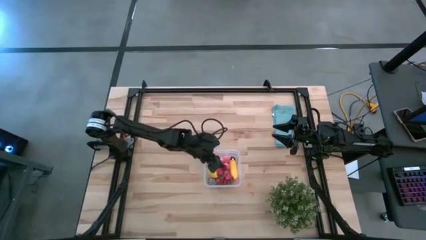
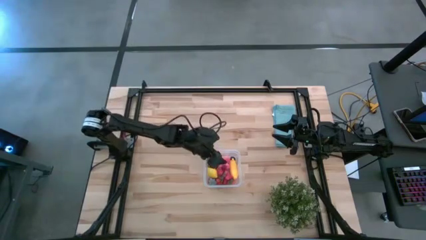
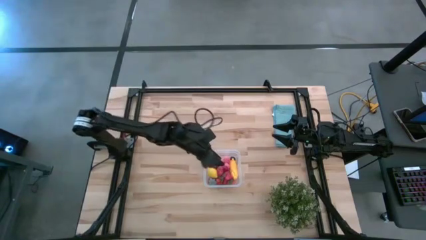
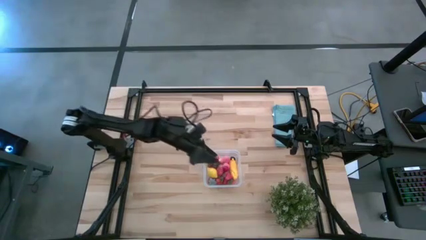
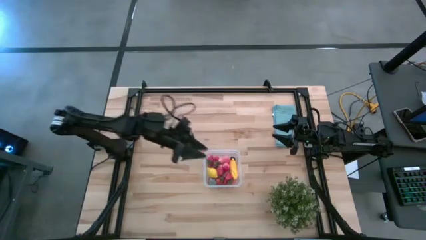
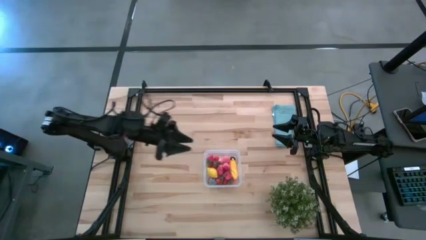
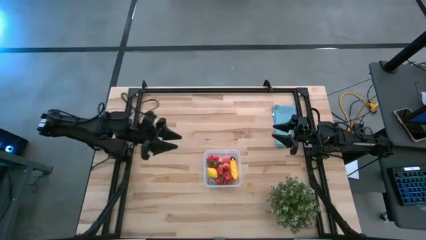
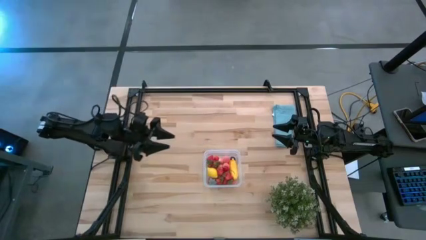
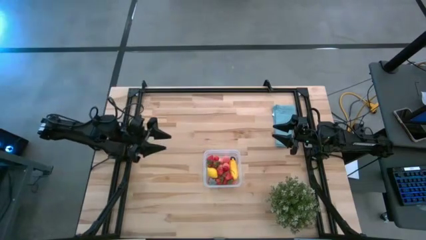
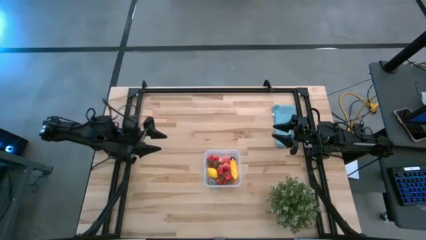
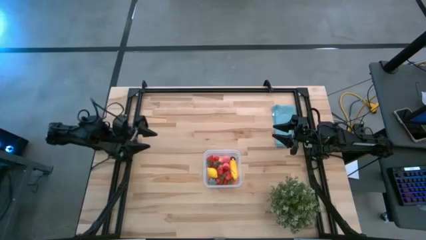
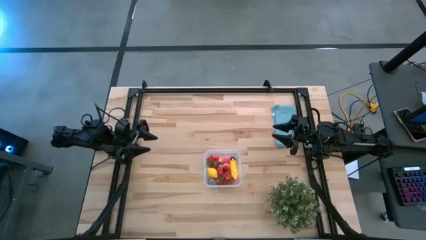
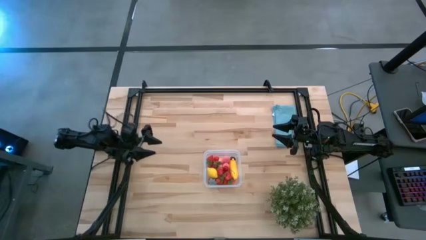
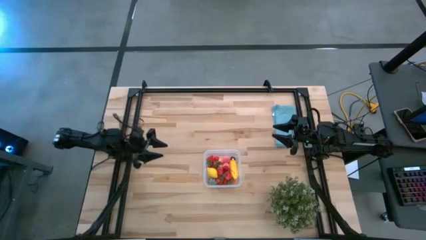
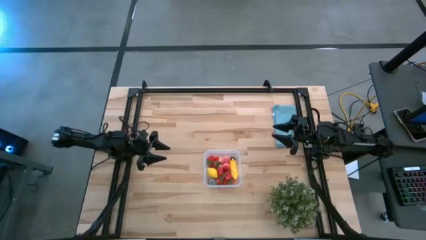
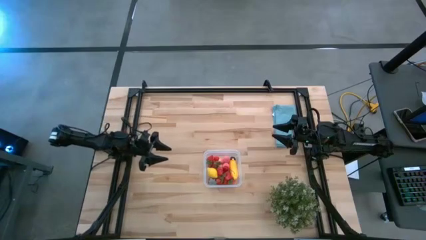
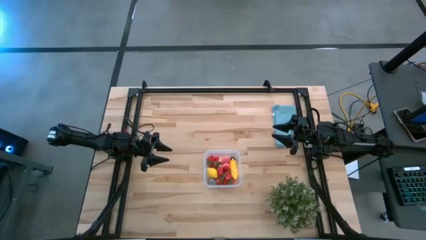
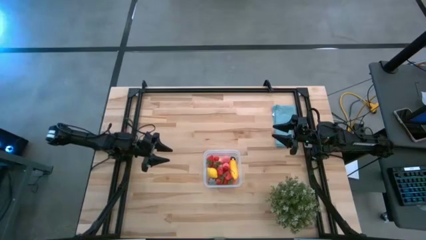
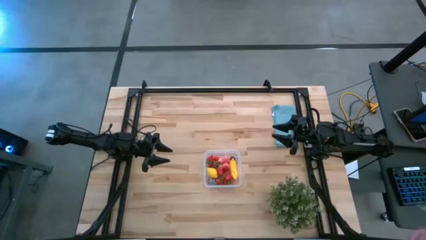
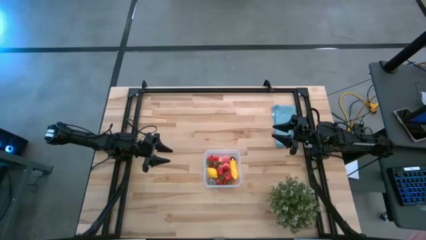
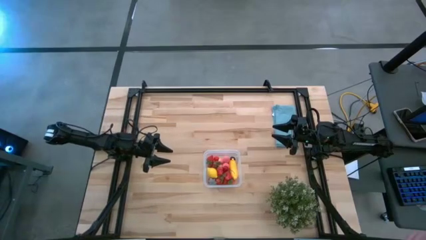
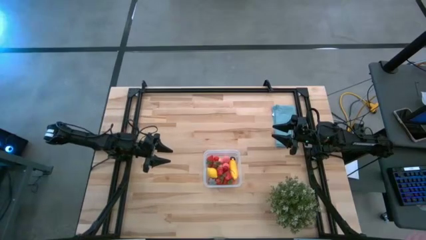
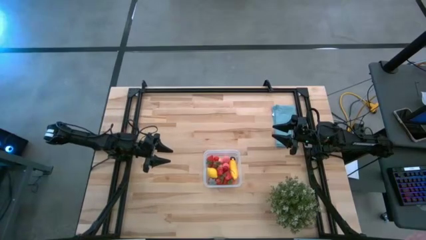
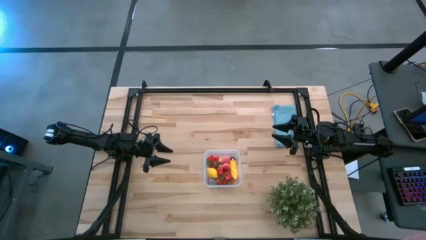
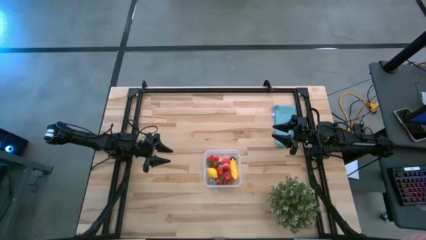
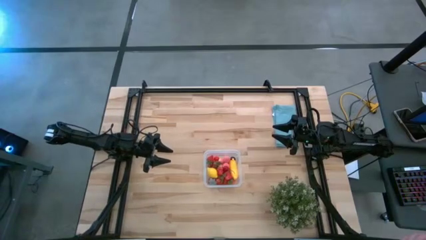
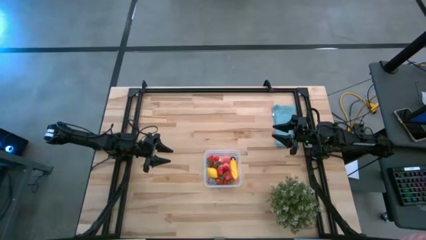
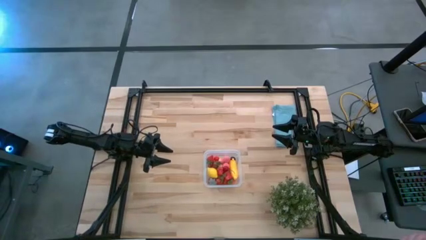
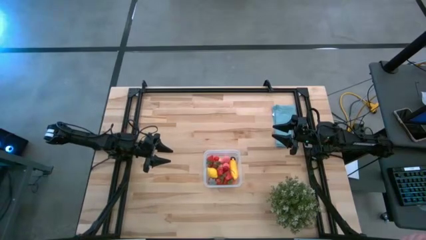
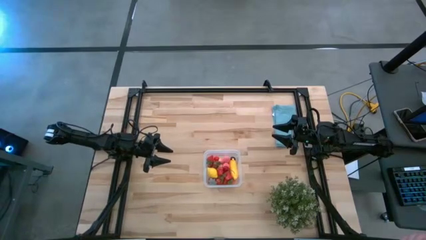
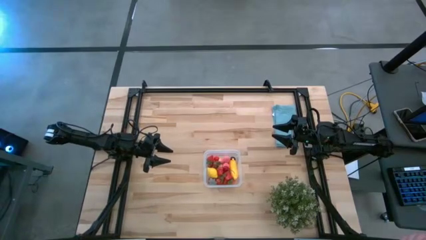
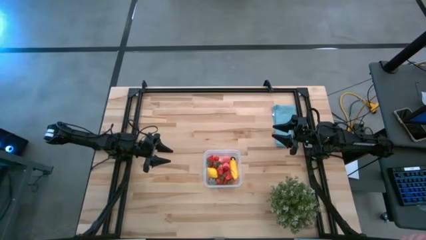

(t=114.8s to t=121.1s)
Task: Pick and placing Produce into tupperware
Return to Home Position

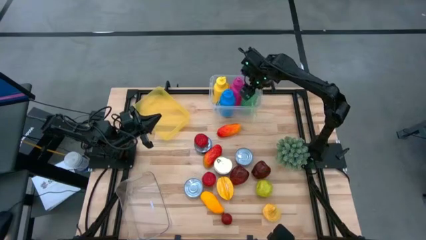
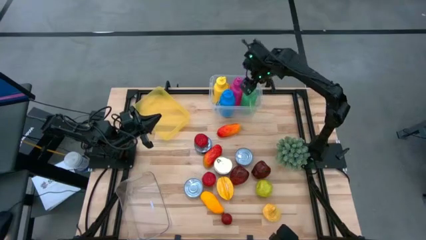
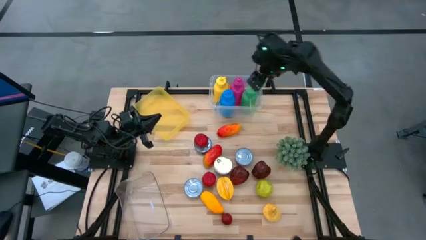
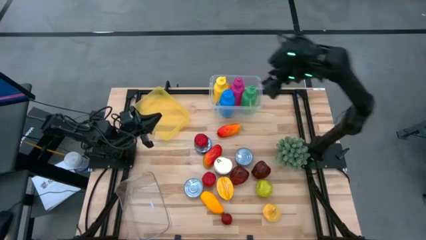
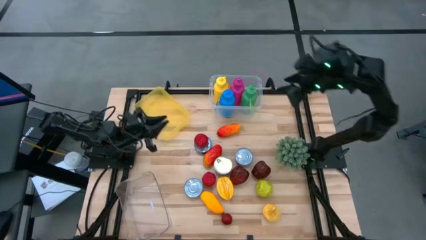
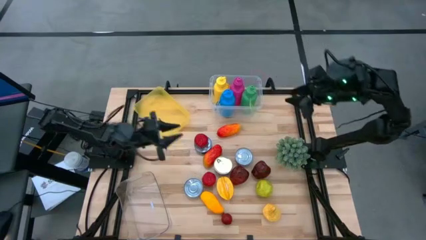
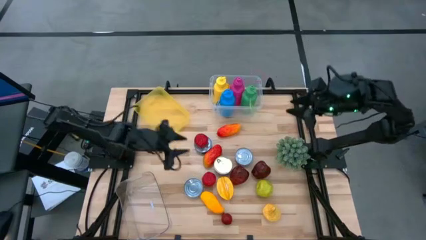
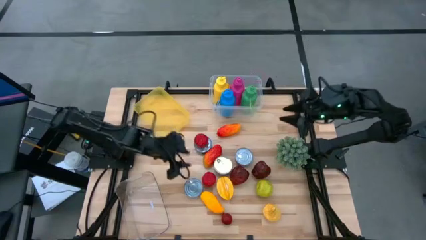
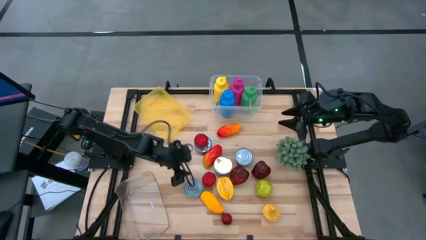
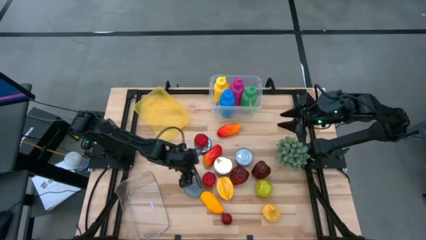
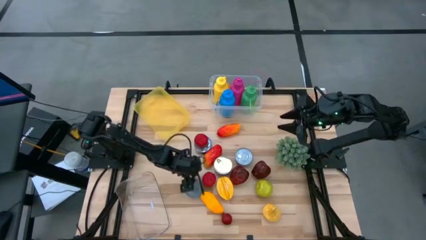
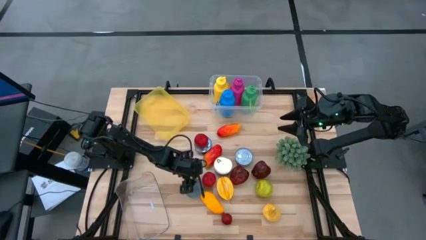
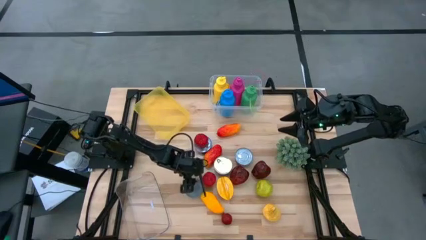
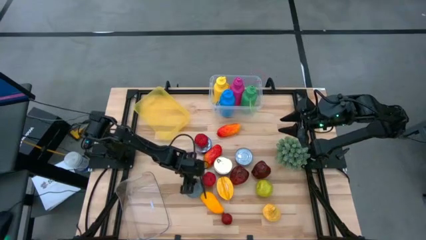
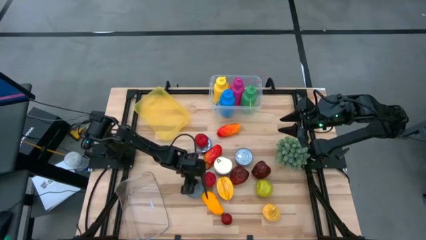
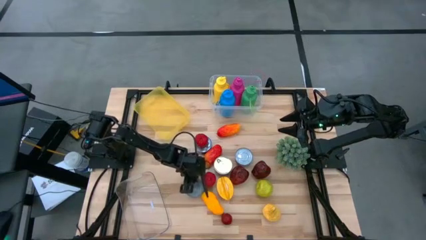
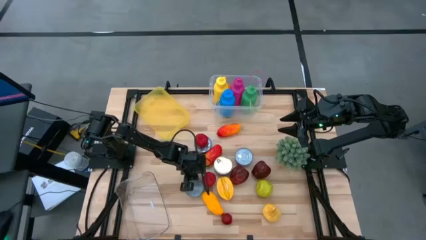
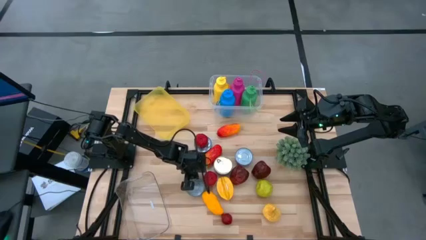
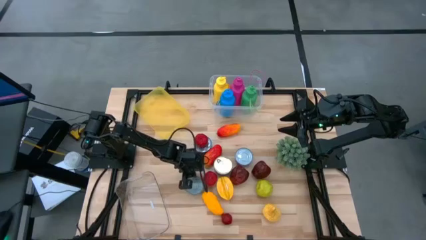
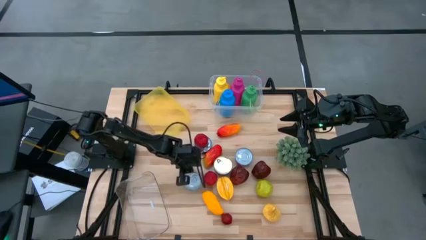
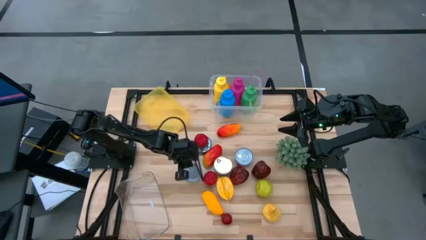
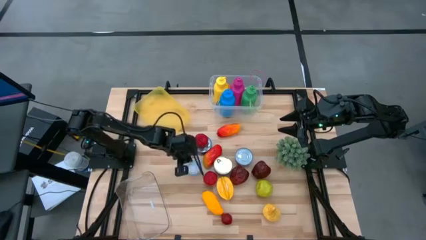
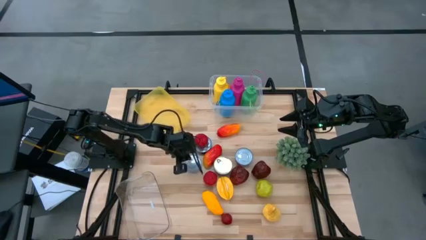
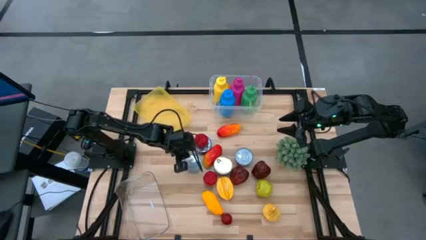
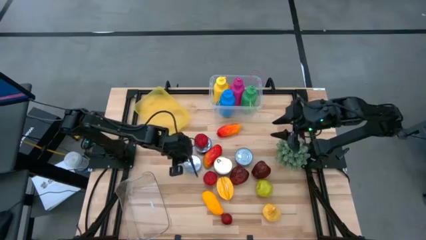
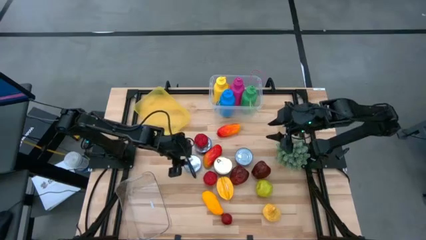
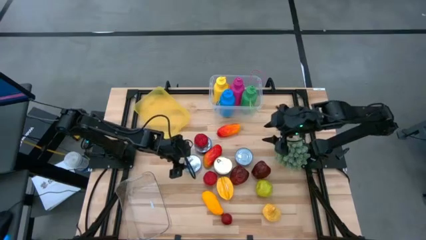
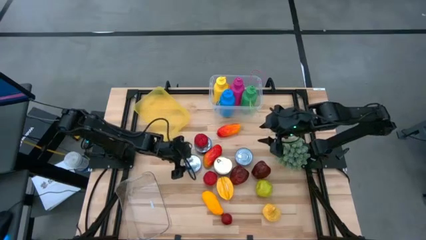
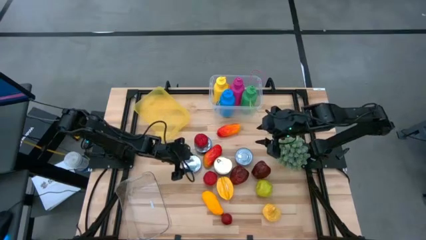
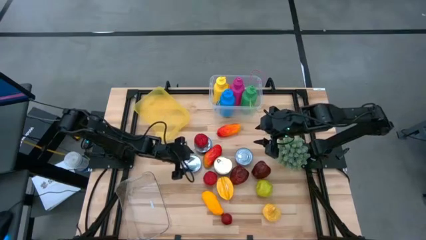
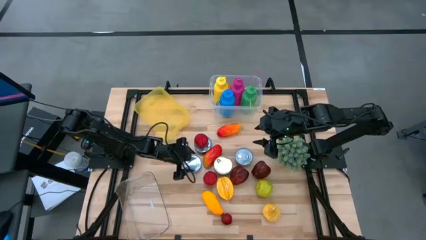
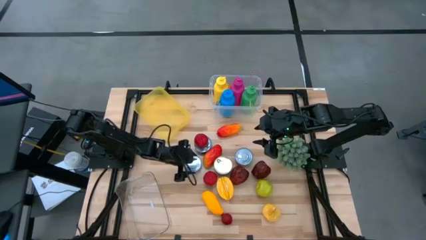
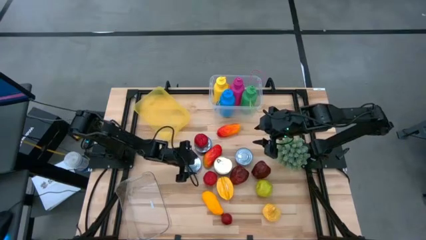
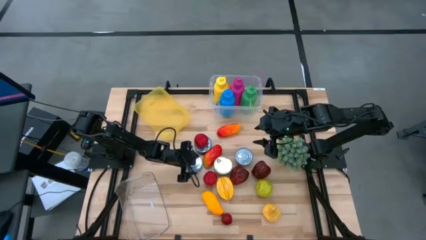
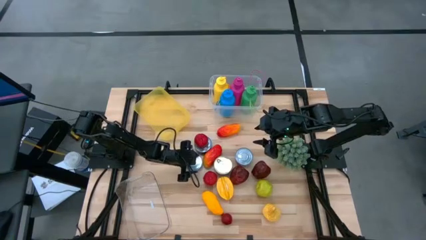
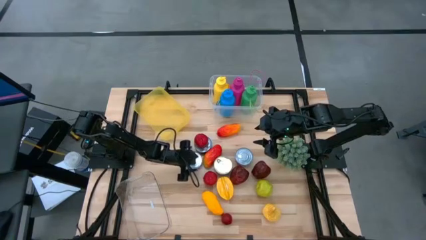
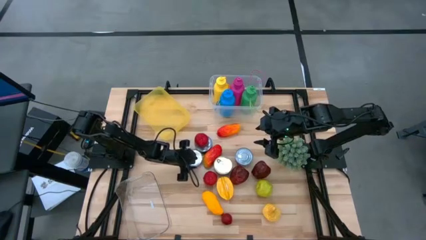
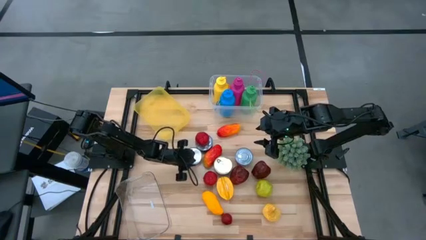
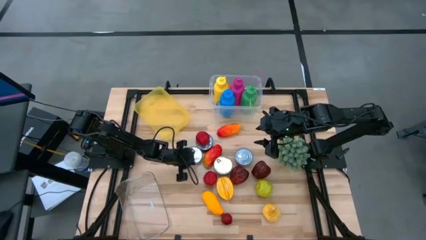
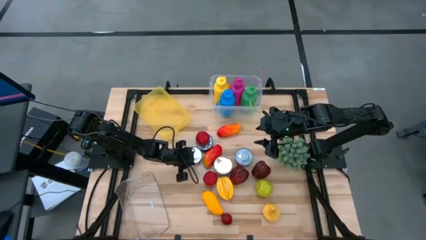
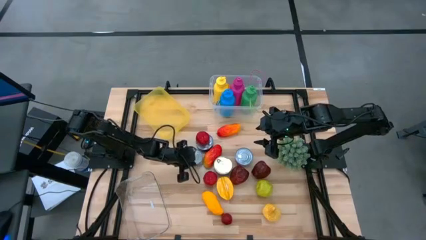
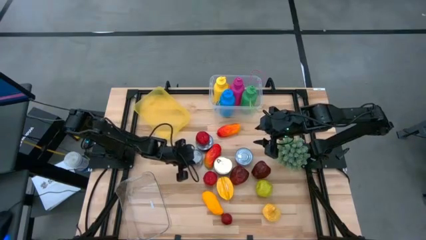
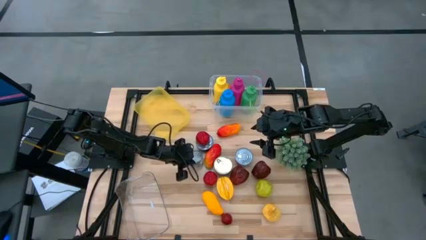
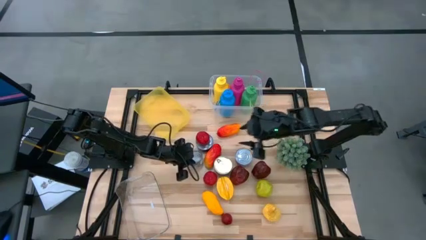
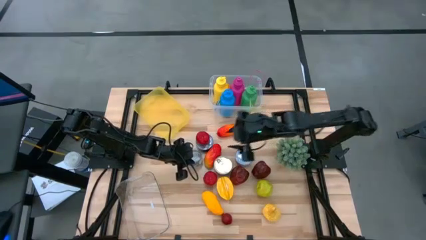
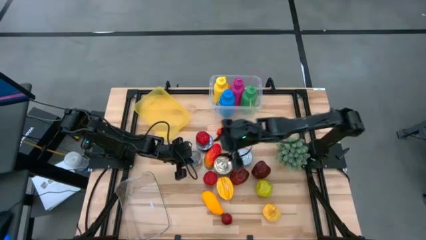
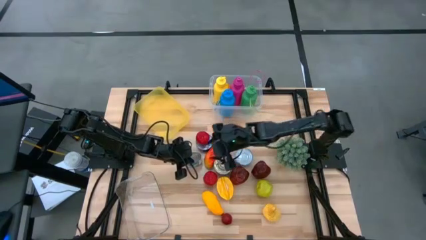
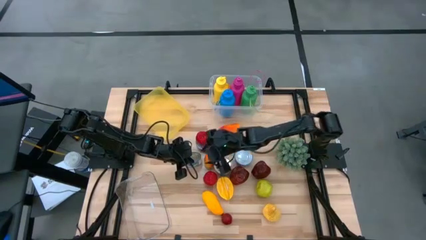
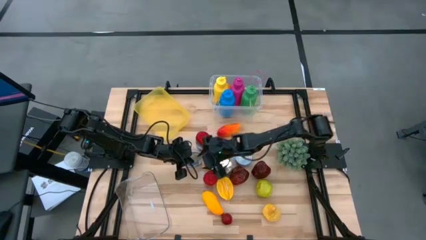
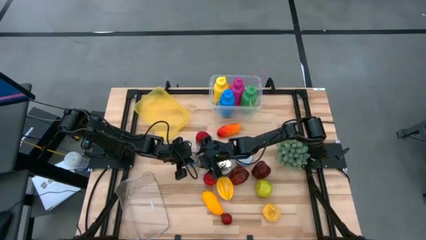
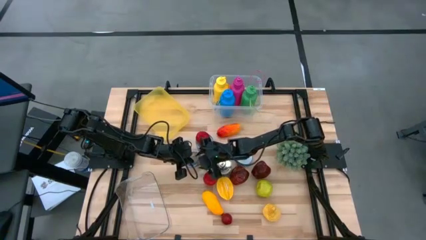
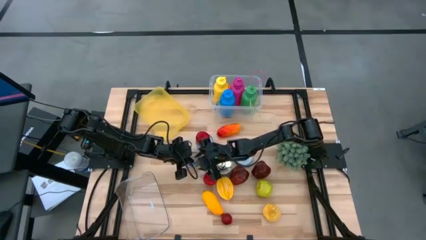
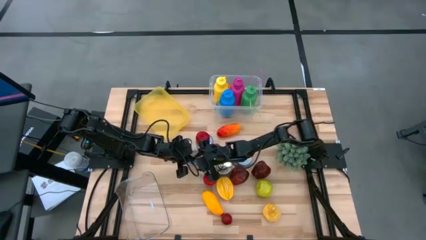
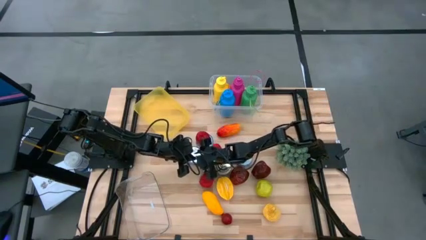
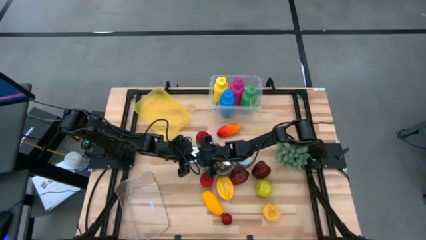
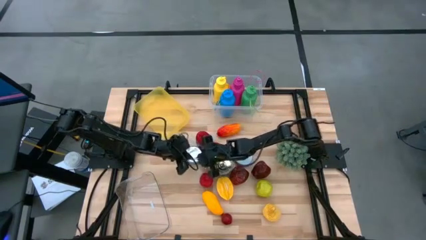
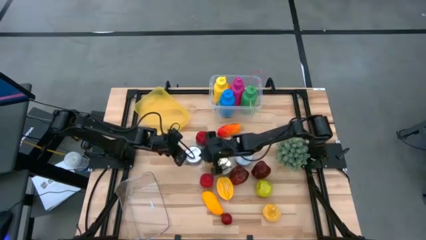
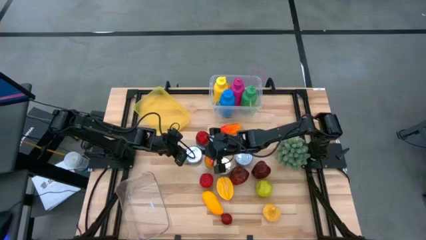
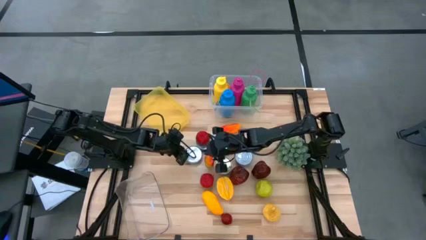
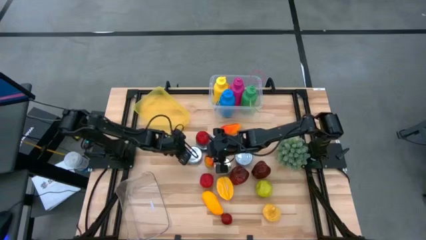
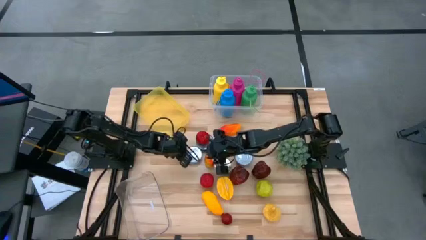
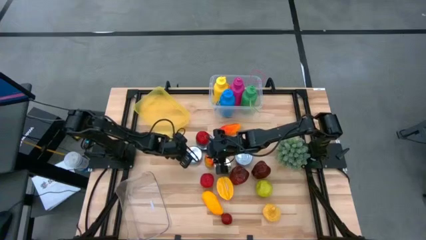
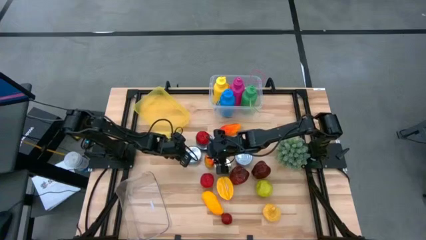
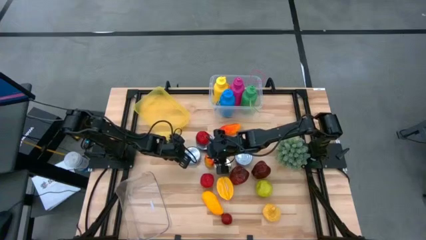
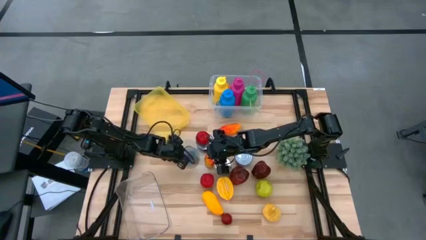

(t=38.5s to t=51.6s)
Task: Pick & Place Food Item
Put the green tuna can into the yellow bin
